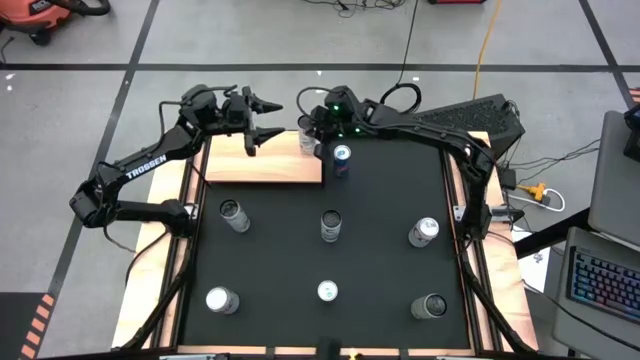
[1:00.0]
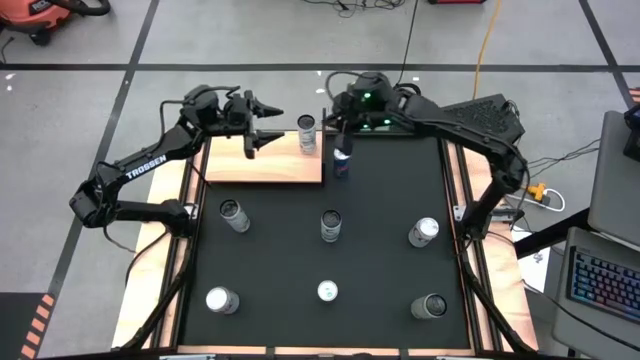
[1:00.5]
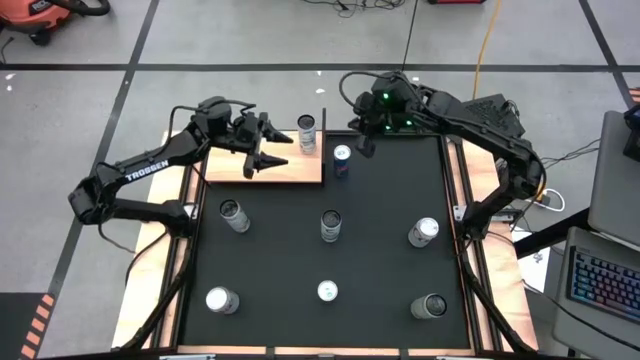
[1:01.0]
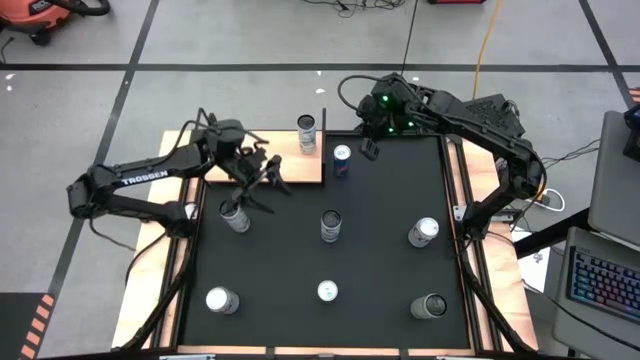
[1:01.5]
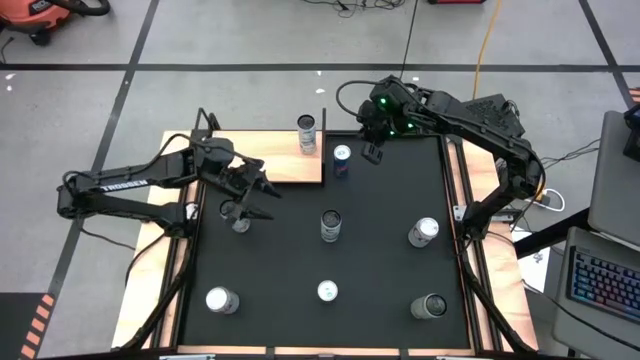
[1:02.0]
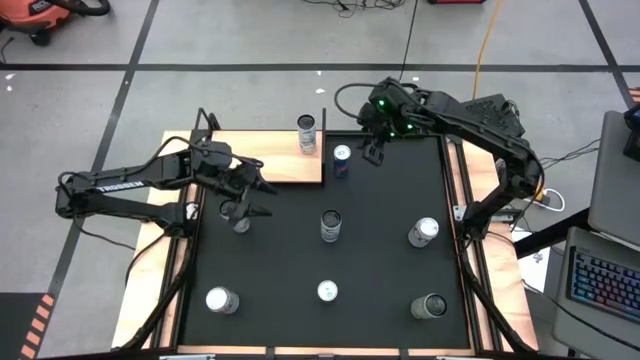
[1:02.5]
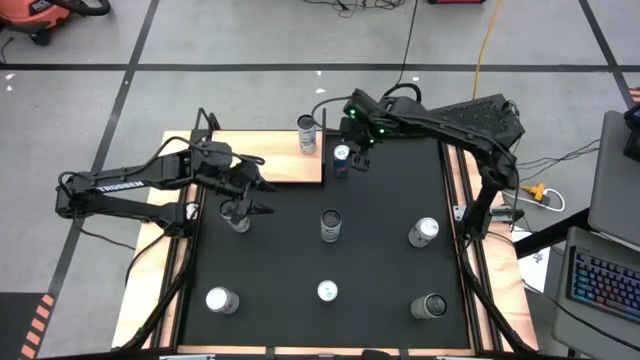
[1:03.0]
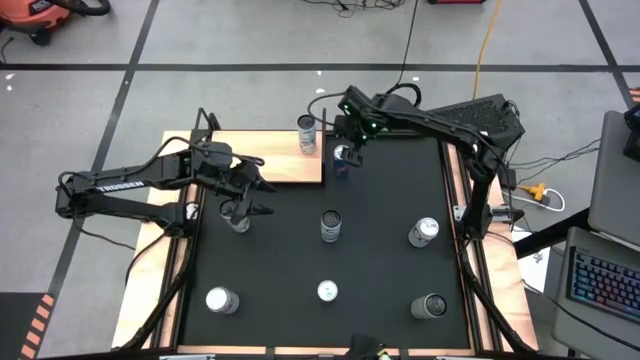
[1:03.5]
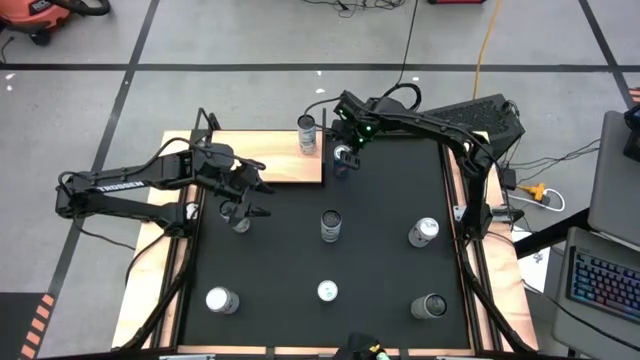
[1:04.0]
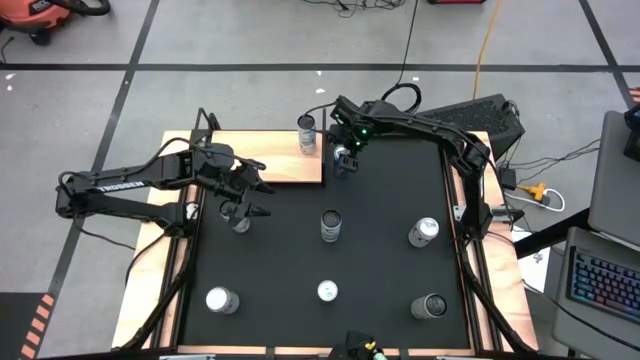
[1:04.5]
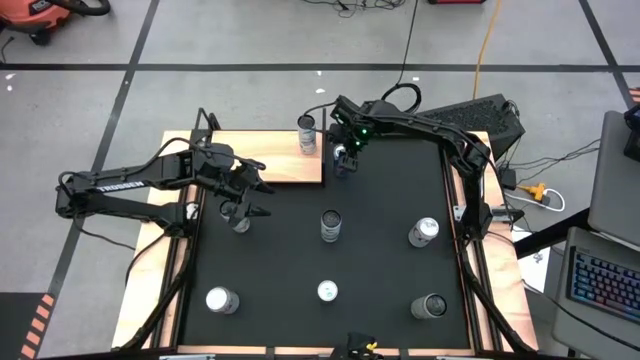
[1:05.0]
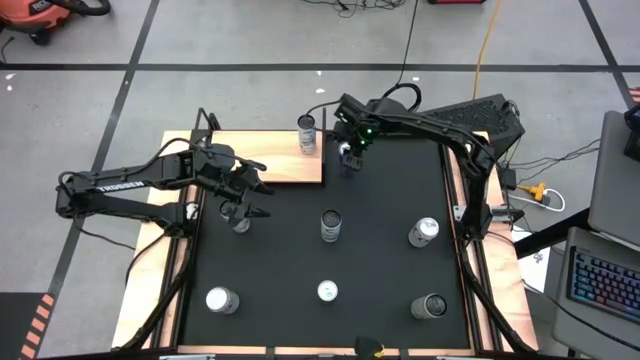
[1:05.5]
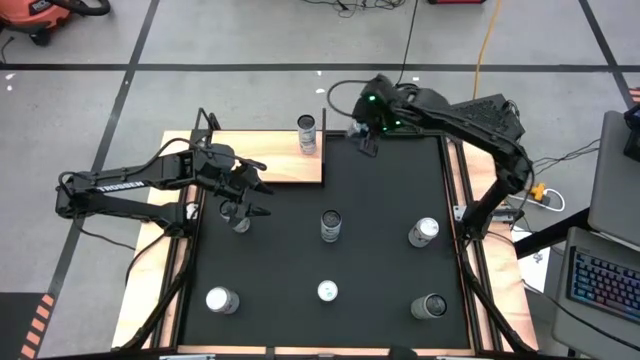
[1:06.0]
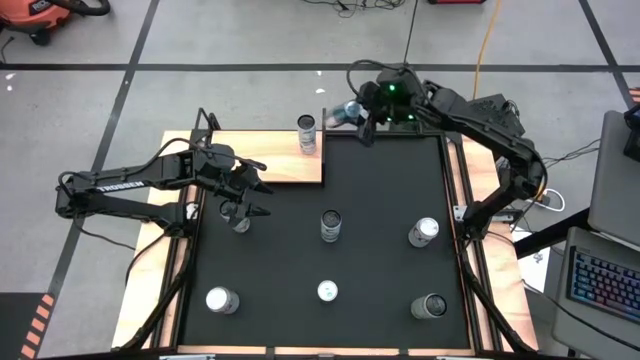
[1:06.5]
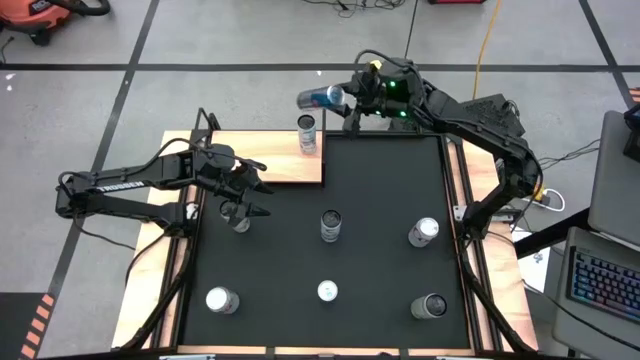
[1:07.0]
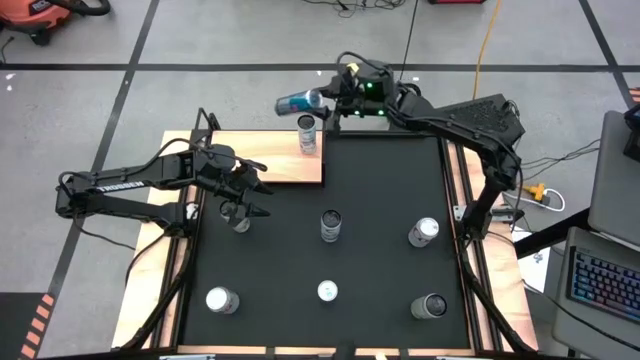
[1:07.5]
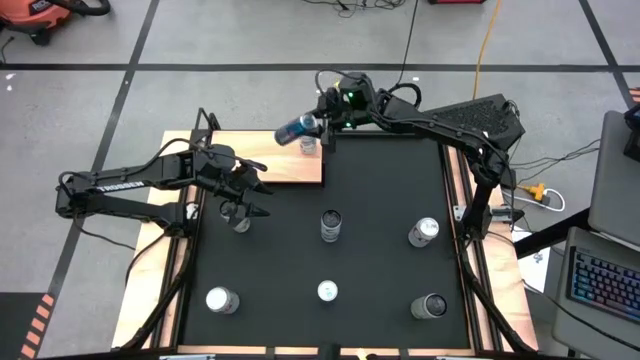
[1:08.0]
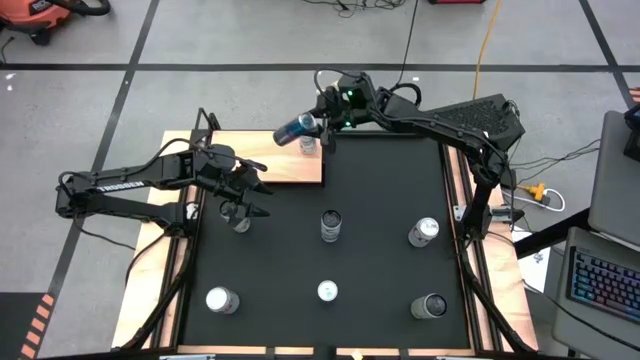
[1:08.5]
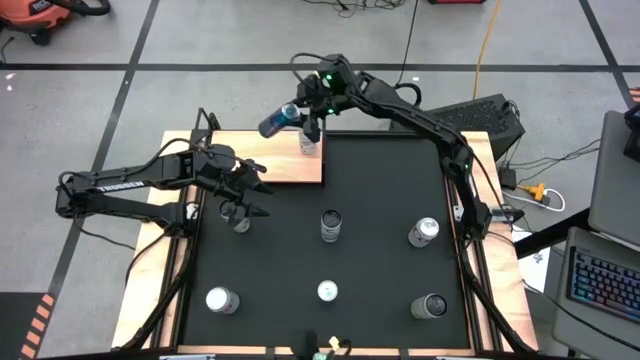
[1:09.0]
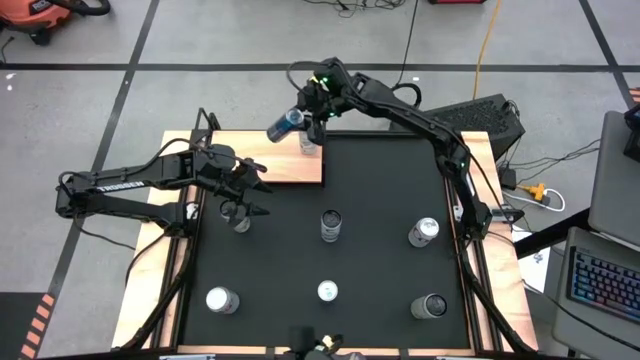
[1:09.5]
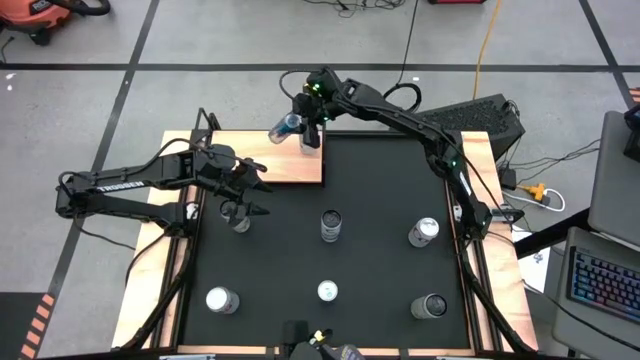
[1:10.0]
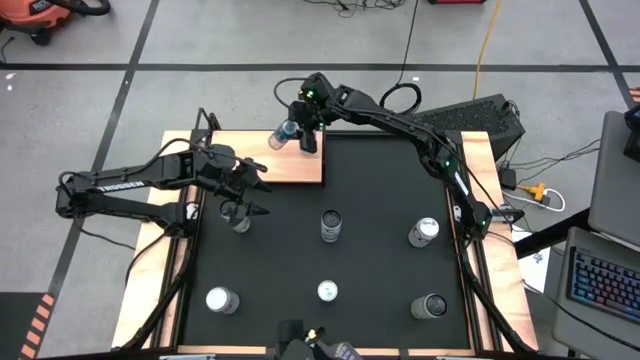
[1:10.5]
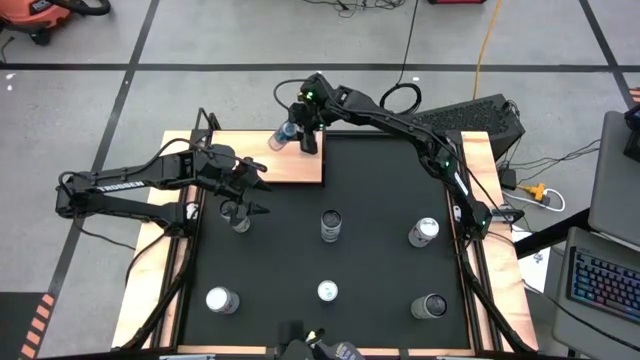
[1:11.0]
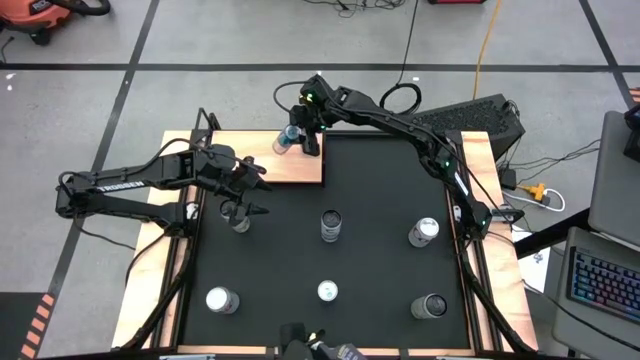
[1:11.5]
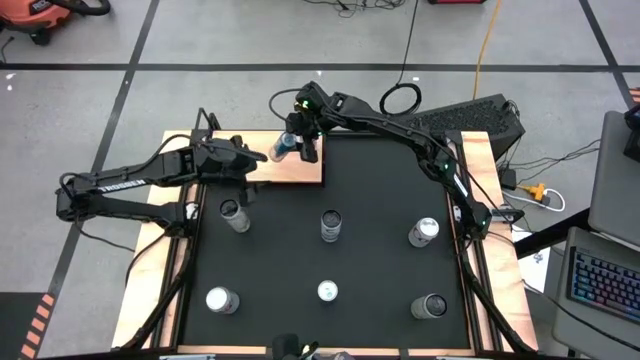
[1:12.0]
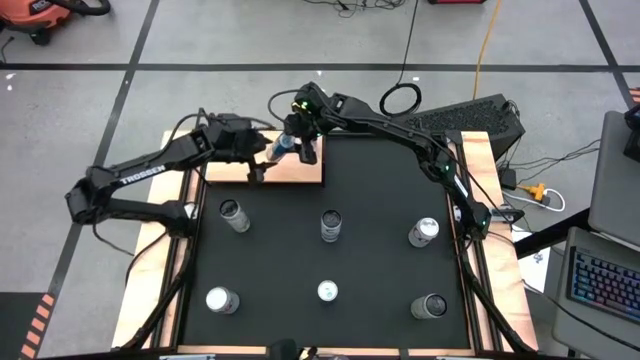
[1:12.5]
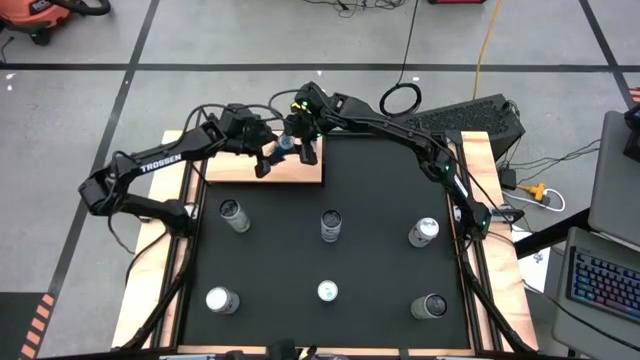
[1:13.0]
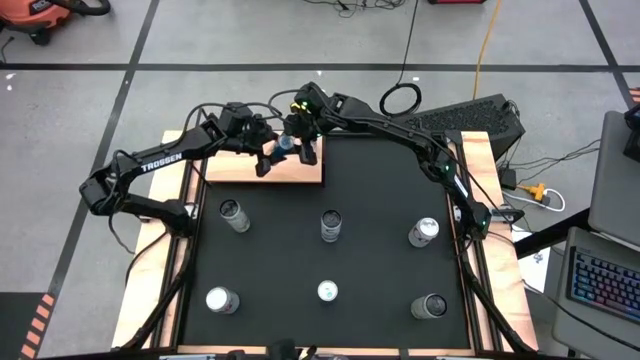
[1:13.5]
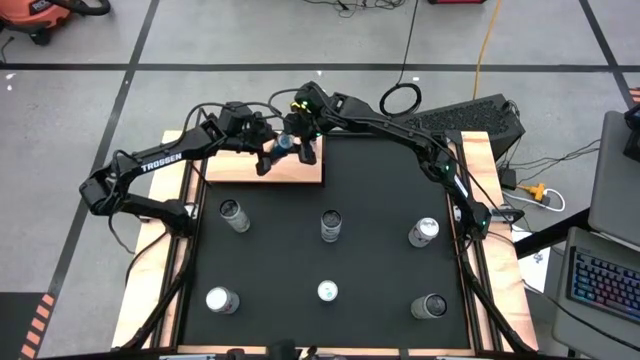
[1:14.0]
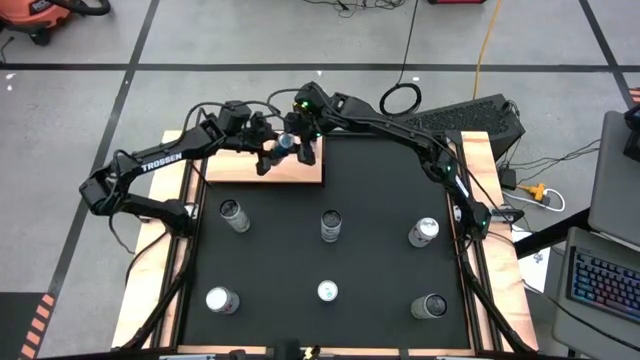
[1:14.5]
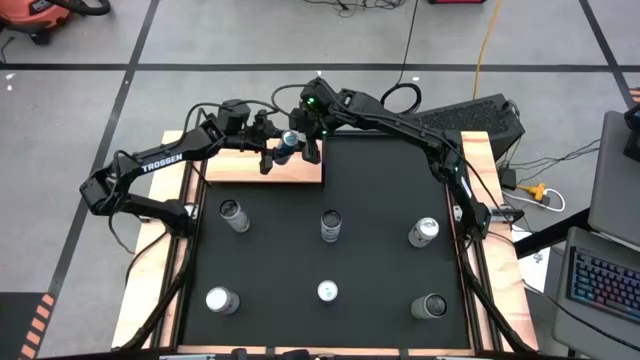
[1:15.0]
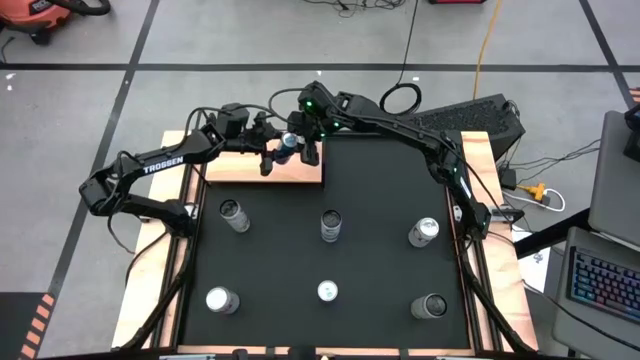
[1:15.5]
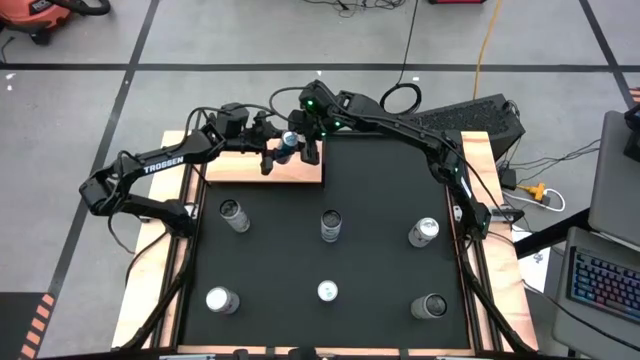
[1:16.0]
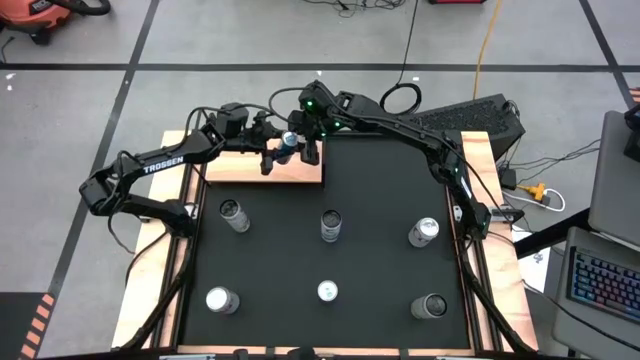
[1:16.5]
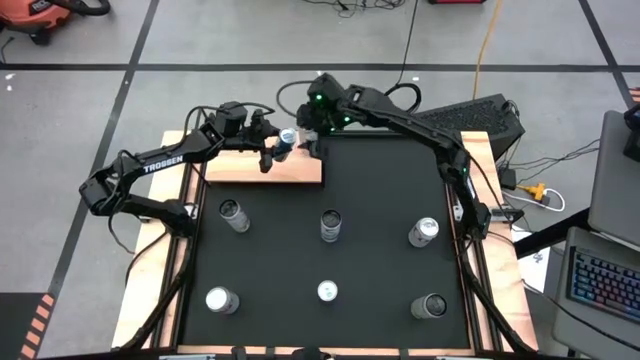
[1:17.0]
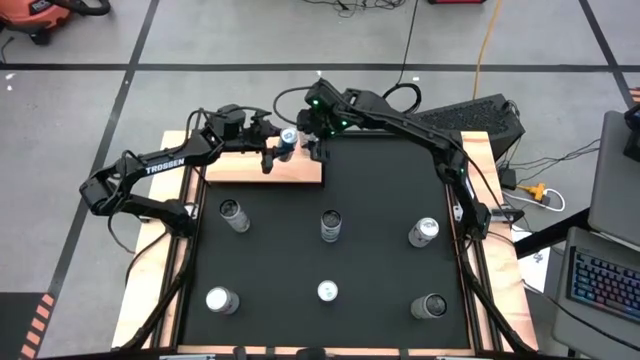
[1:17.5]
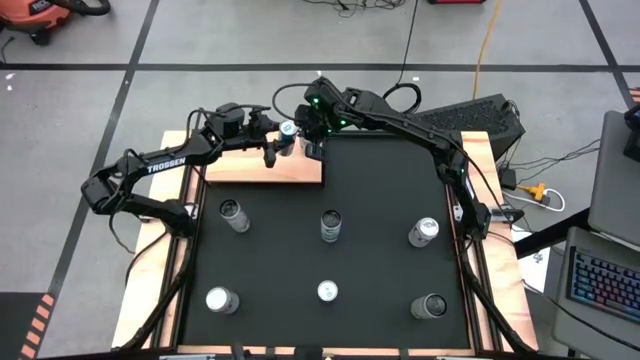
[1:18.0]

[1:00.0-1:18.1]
Task: Place canned beverage on shelf
Put the top blue soda can on the shelf

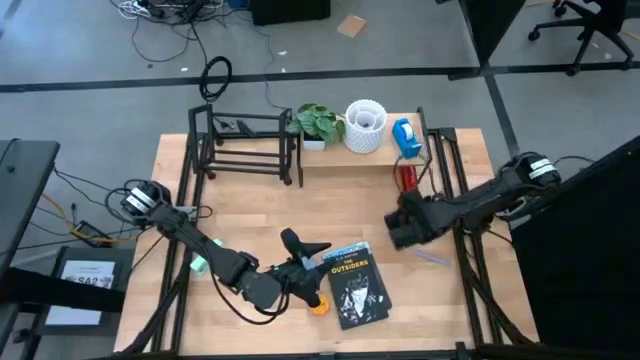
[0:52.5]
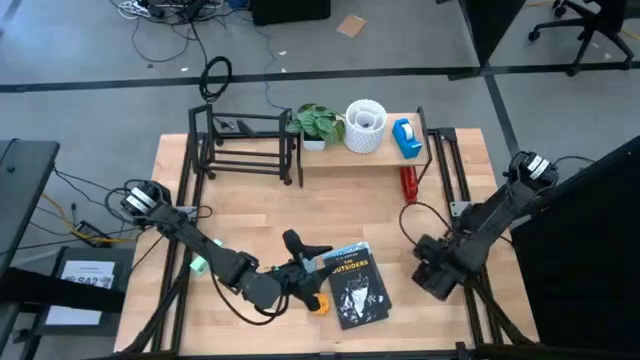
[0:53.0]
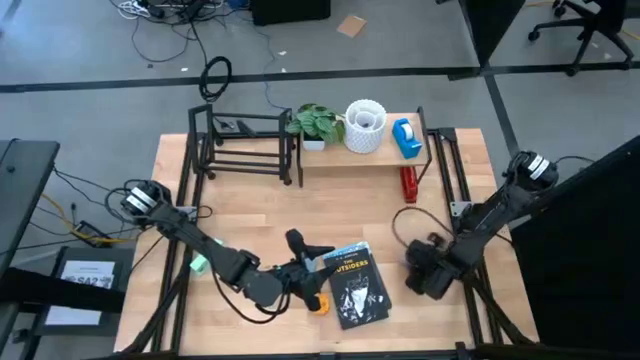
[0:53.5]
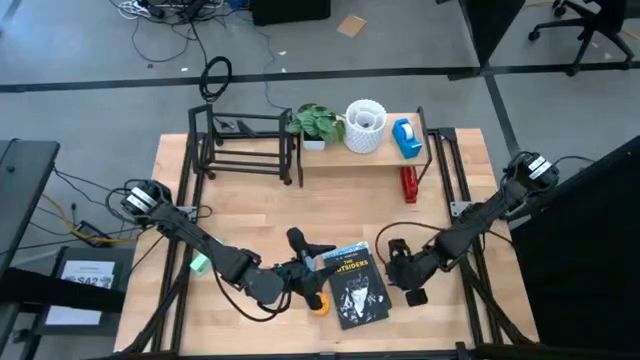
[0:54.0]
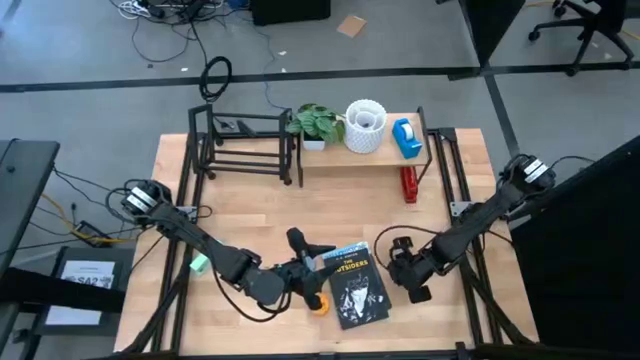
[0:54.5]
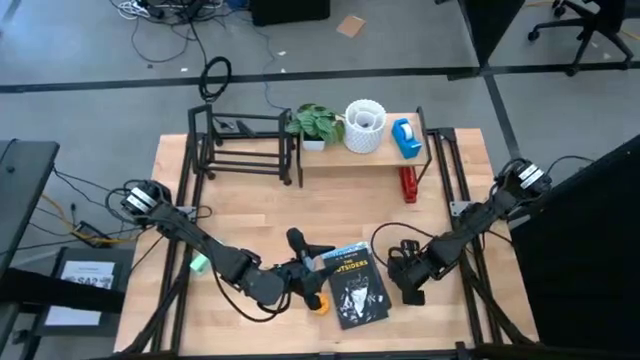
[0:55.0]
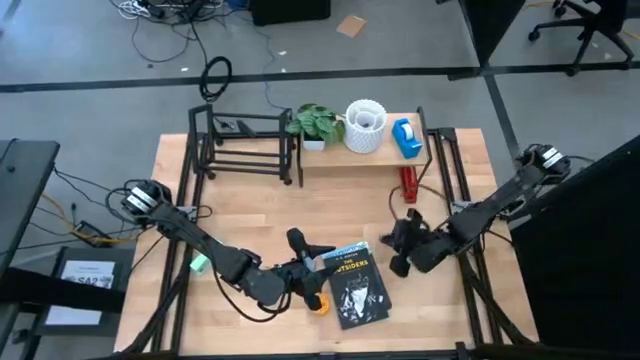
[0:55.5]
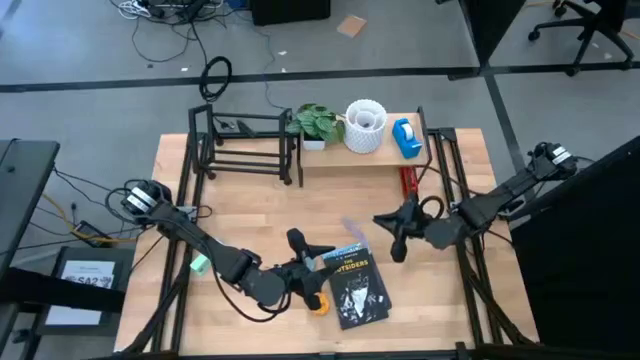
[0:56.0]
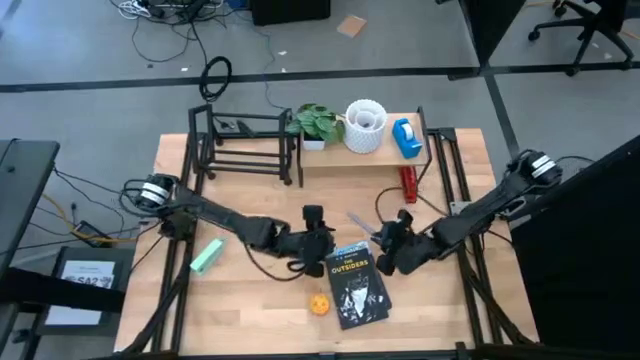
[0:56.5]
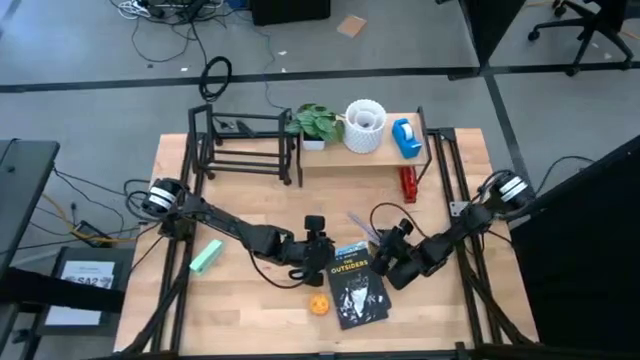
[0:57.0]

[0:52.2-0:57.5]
Task: Stock shelves
Put the purple pen into the white pen organizer on the shelf
